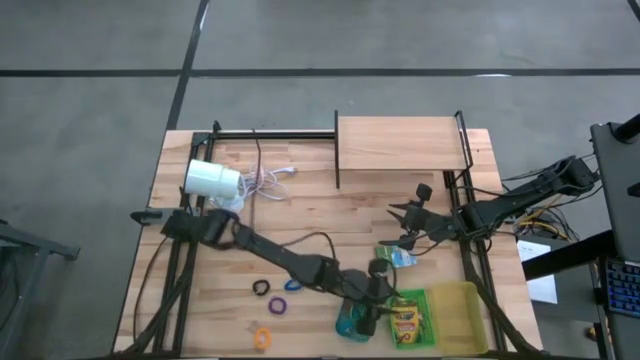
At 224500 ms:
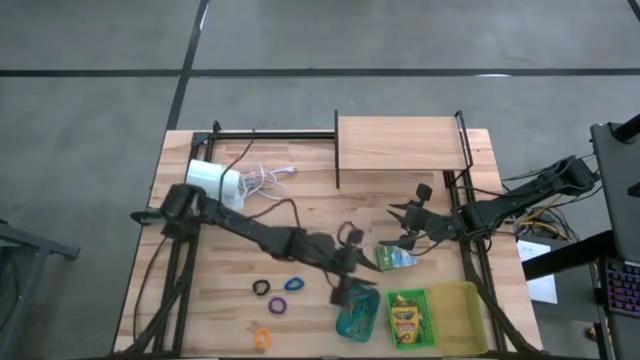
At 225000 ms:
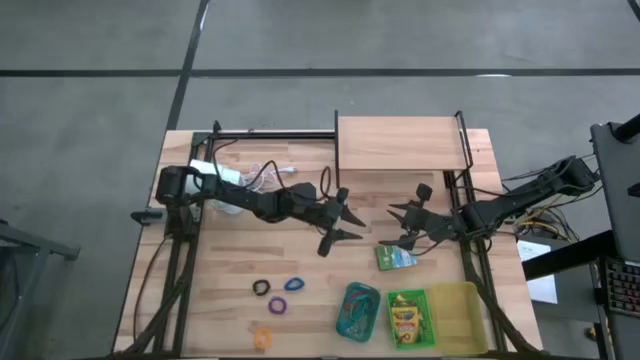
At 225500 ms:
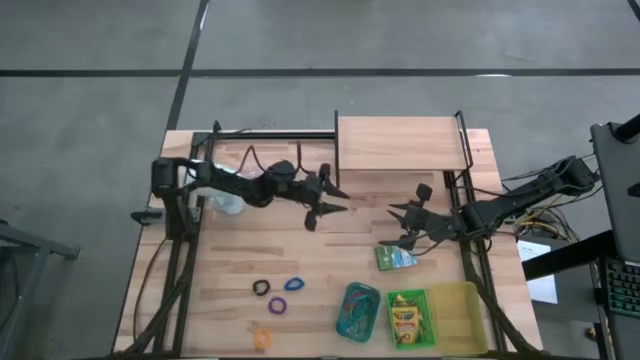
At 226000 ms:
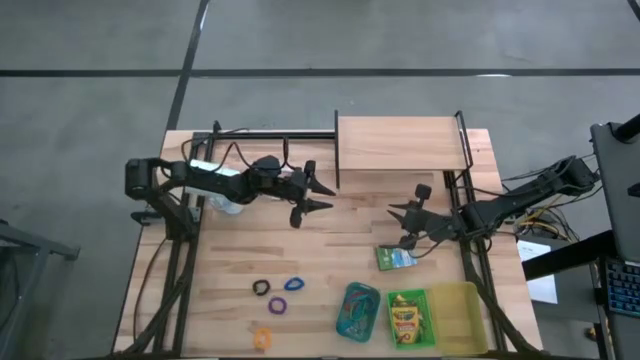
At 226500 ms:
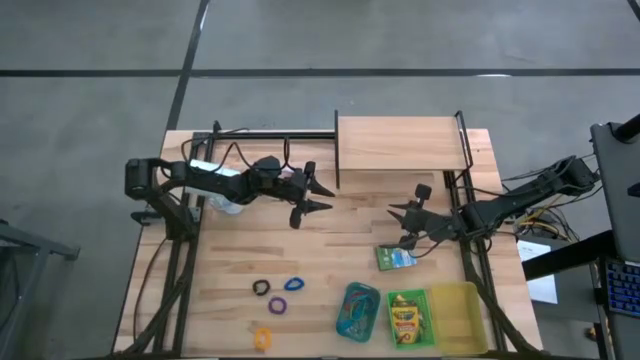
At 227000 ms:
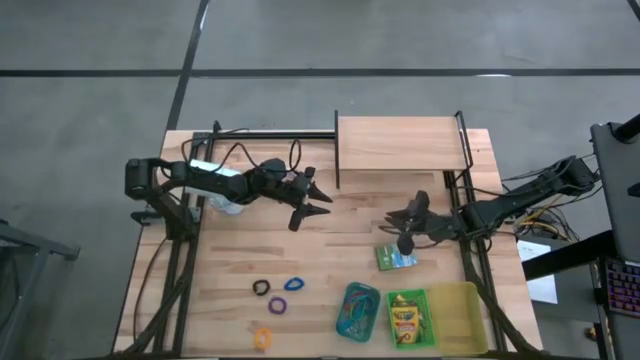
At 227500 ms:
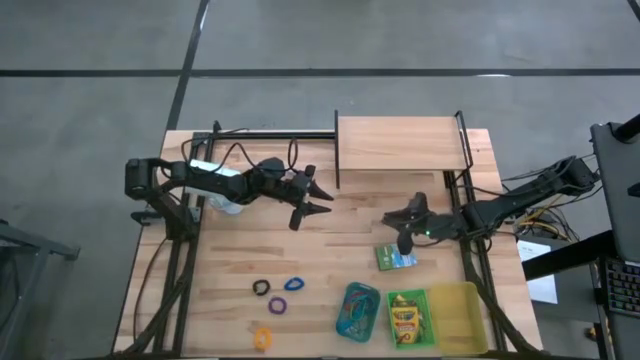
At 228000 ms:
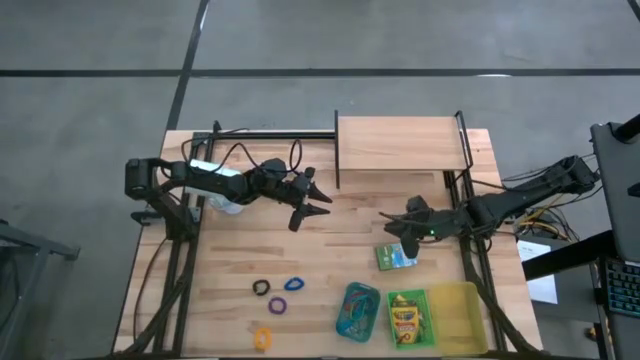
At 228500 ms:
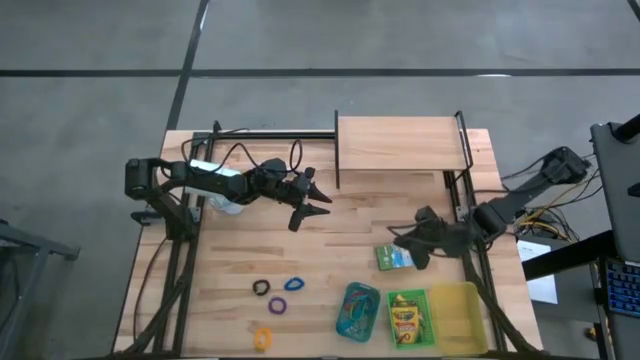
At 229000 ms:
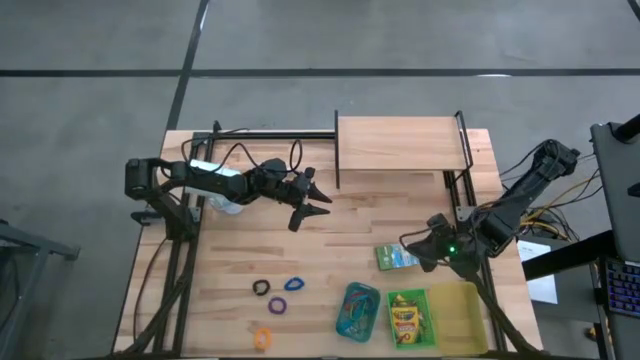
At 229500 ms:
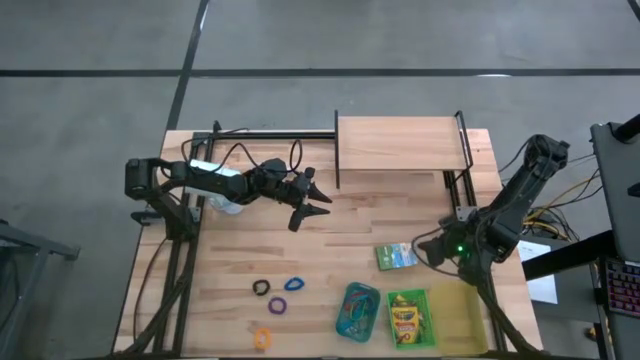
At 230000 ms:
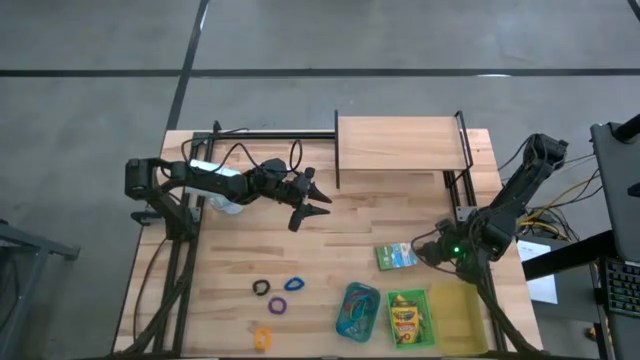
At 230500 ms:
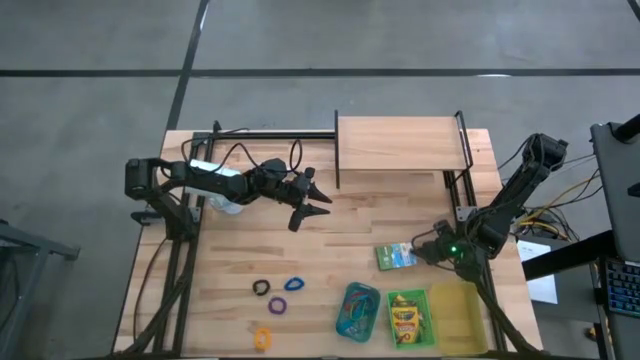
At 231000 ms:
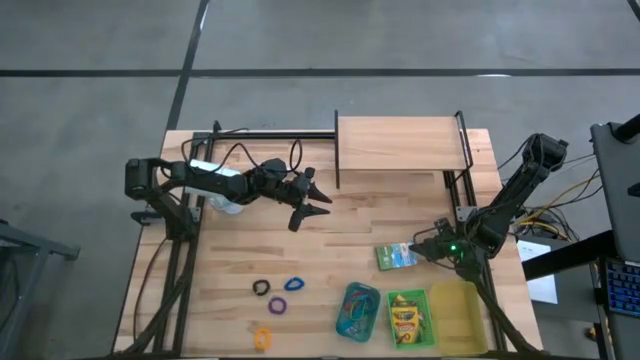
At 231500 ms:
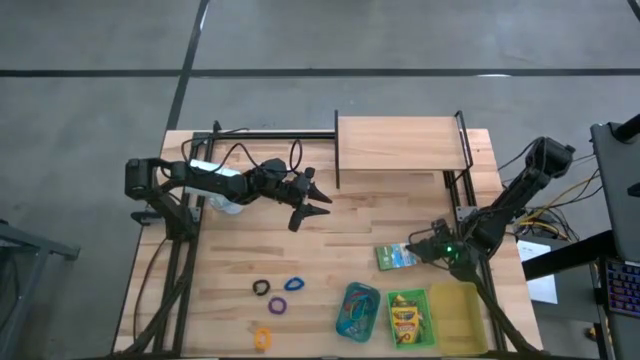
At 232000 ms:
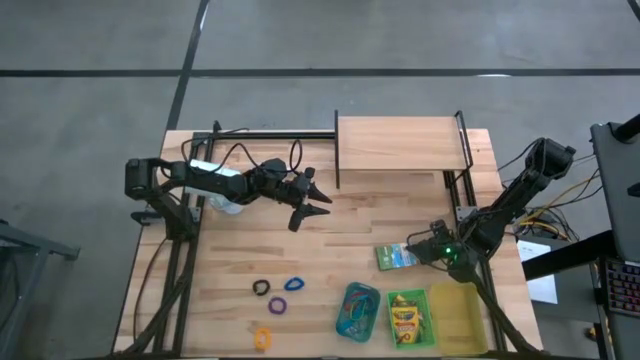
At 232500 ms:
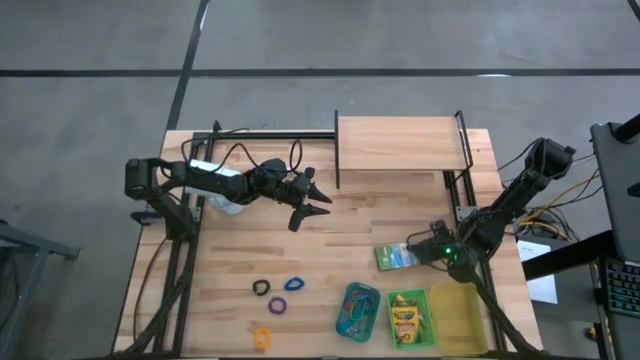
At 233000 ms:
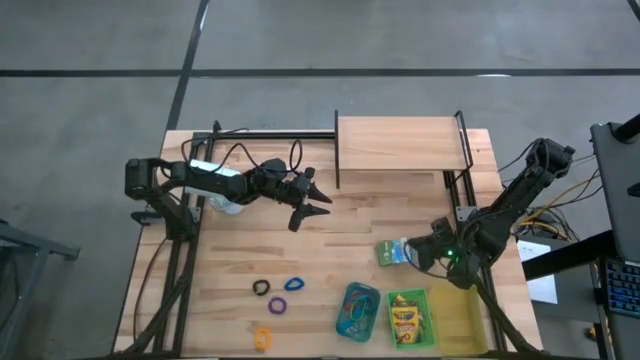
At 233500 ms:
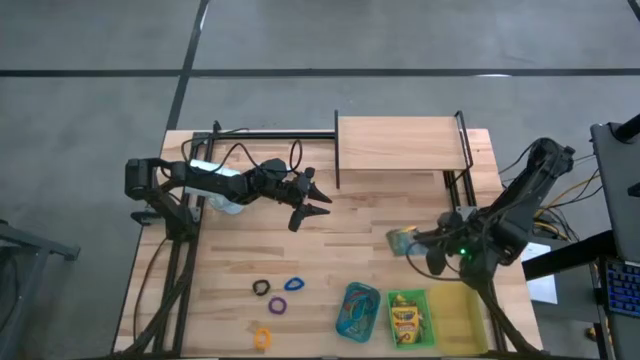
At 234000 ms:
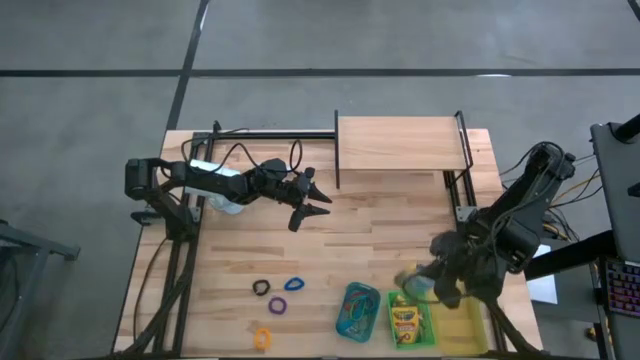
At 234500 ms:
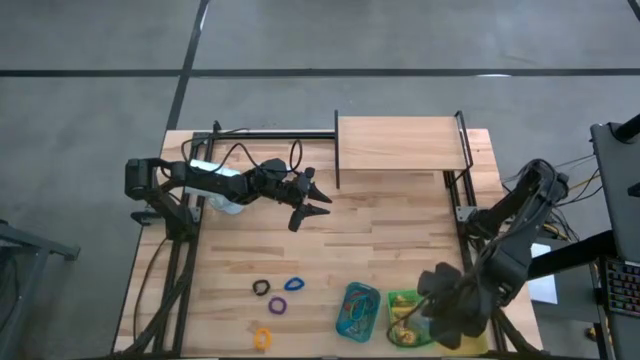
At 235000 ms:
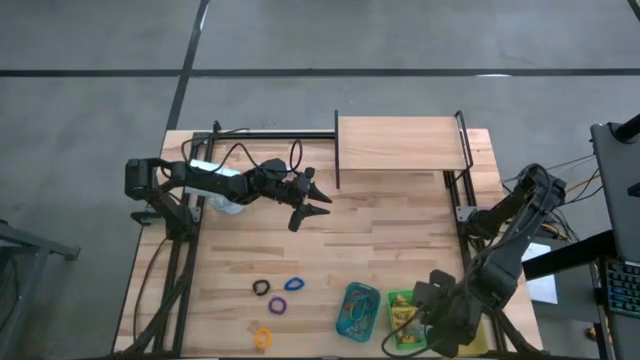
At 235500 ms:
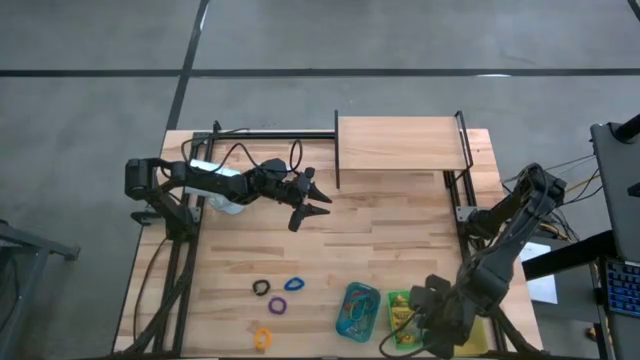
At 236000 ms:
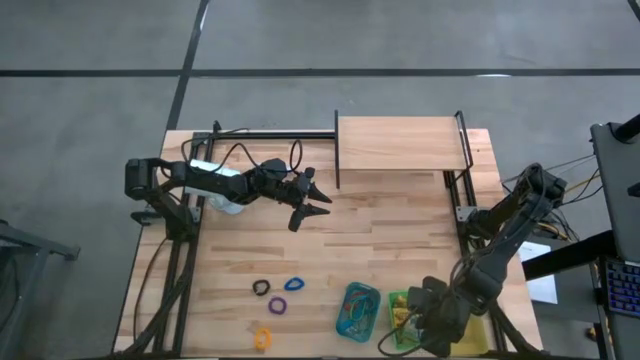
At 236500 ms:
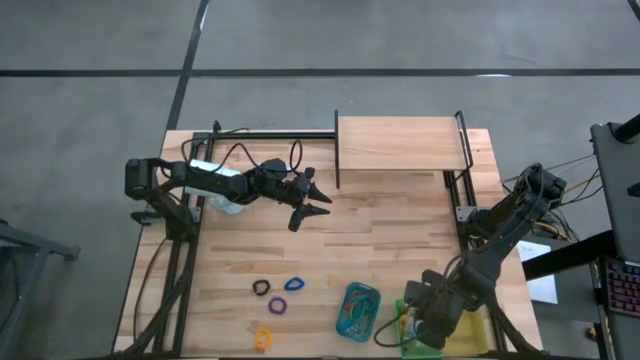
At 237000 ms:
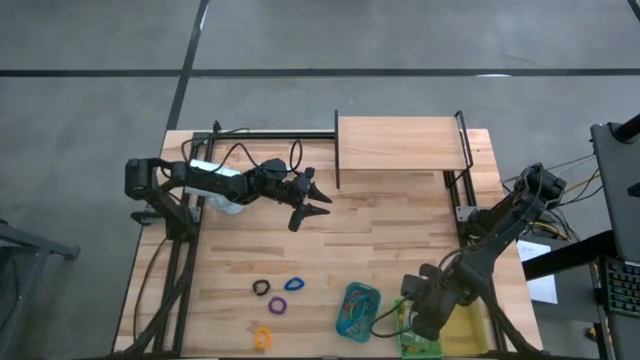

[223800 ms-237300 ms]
Task: Pick & Place Office Desk Supplies
Put the crayon box into the green bin

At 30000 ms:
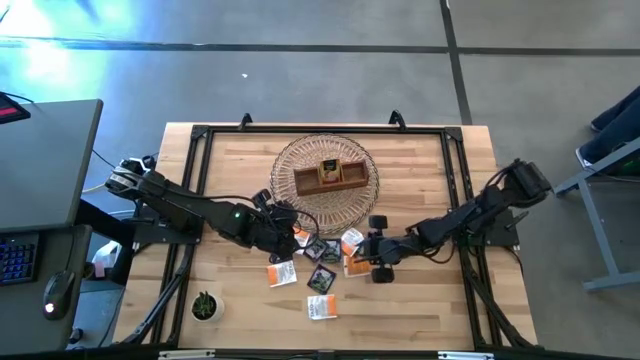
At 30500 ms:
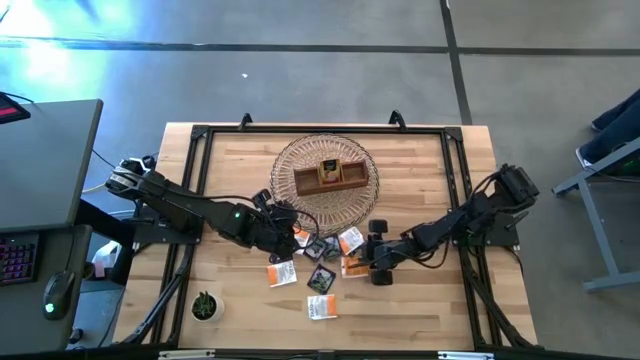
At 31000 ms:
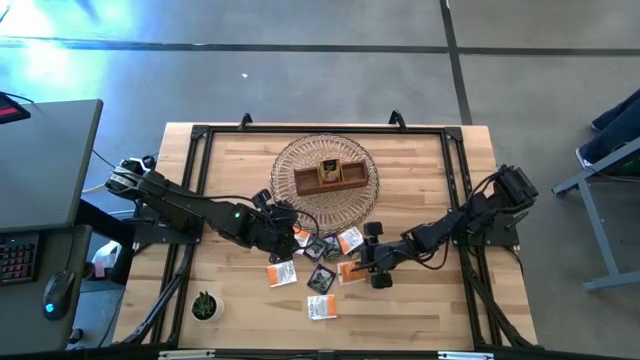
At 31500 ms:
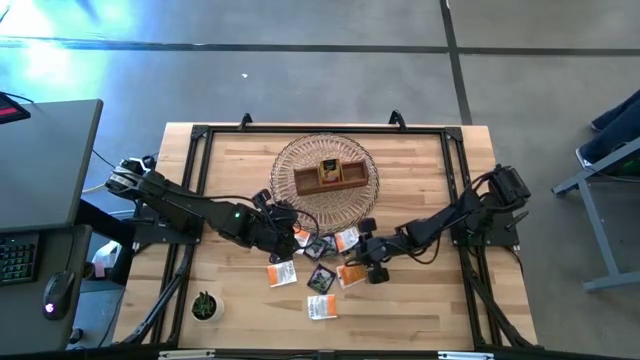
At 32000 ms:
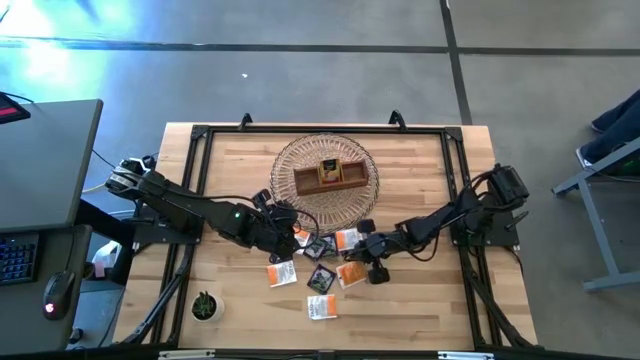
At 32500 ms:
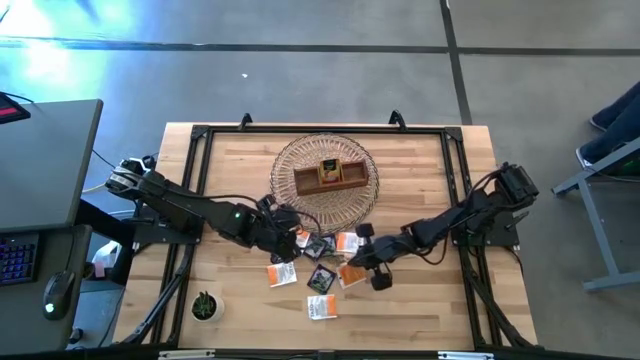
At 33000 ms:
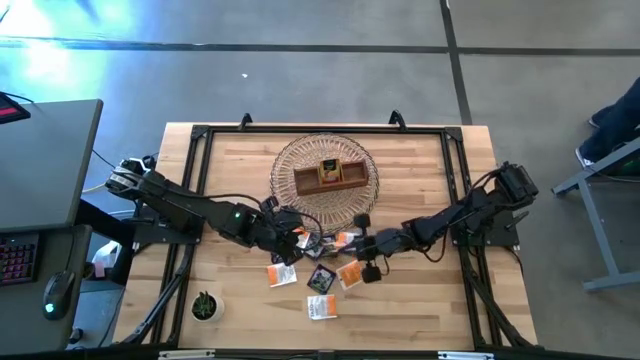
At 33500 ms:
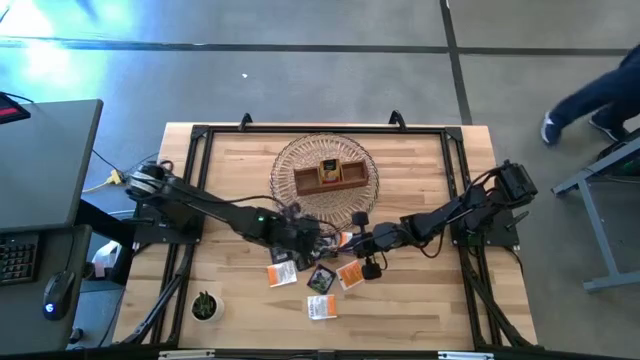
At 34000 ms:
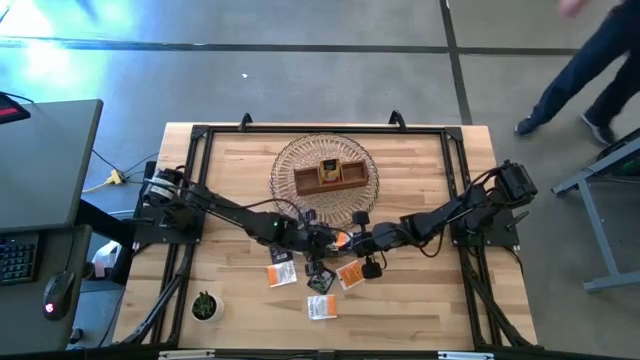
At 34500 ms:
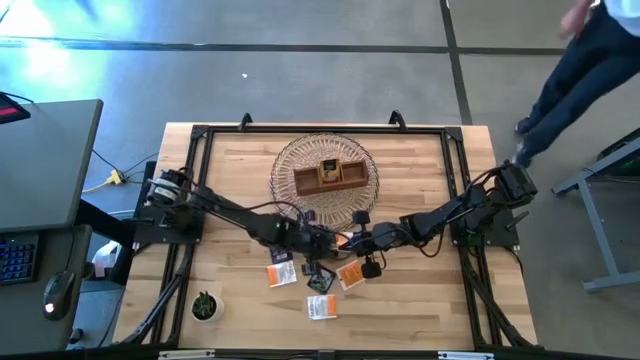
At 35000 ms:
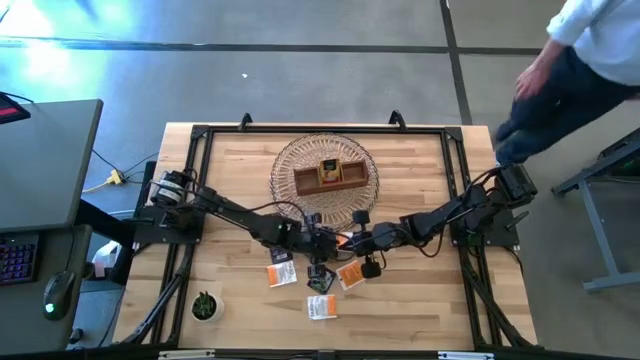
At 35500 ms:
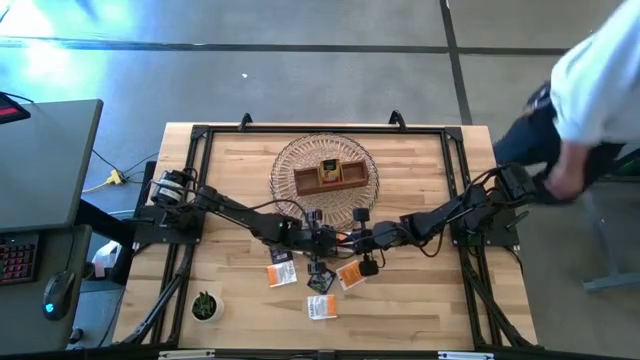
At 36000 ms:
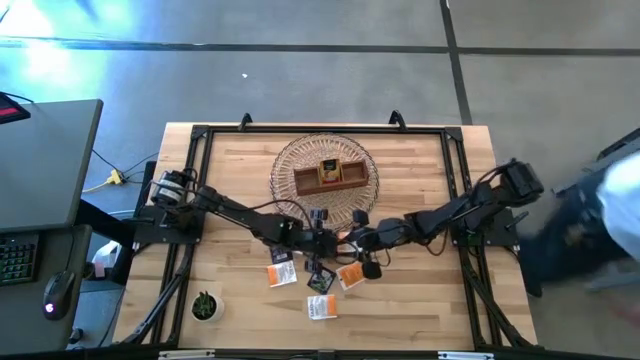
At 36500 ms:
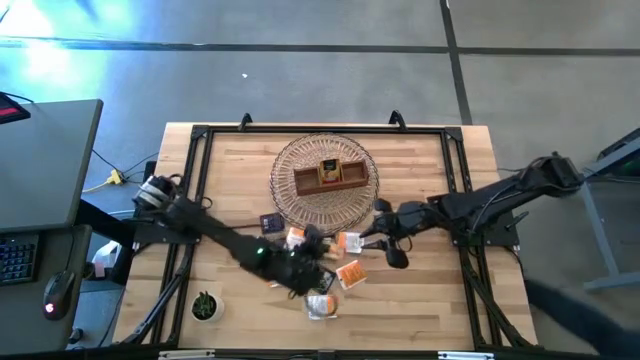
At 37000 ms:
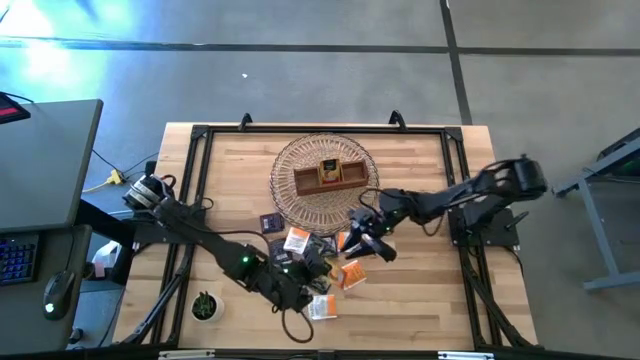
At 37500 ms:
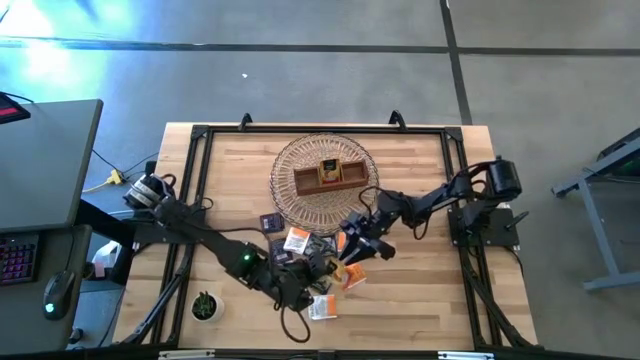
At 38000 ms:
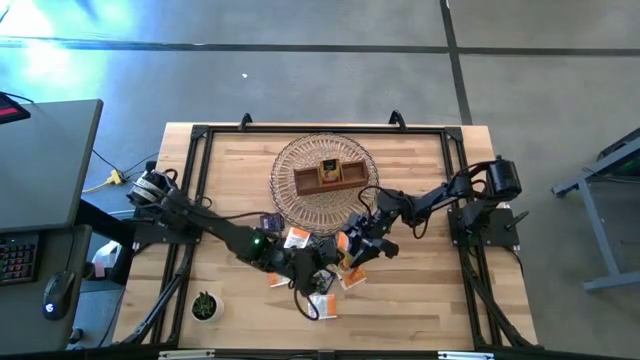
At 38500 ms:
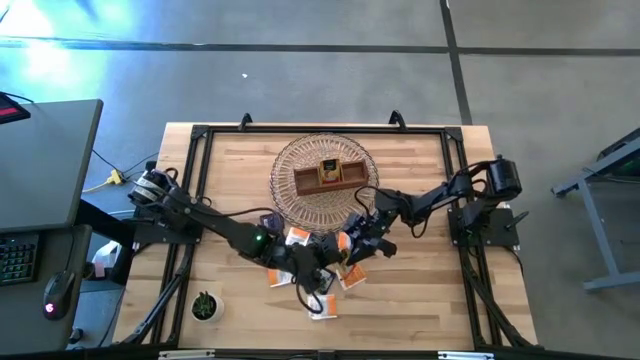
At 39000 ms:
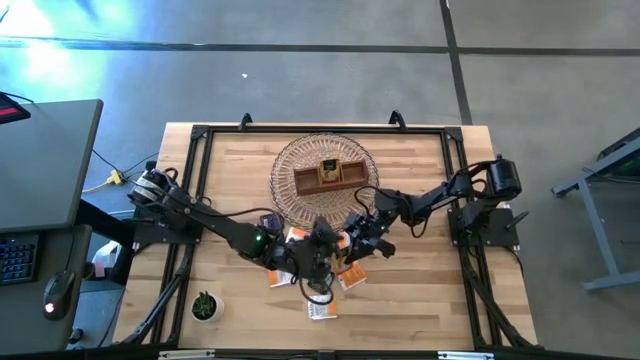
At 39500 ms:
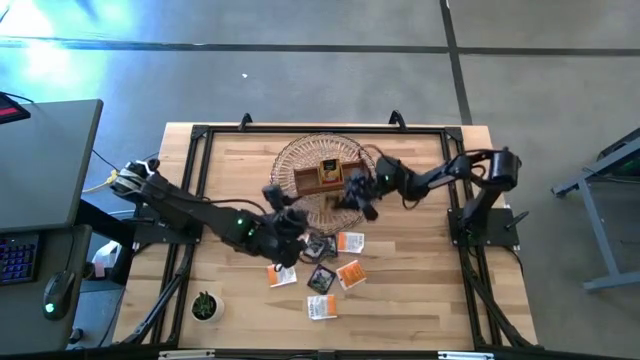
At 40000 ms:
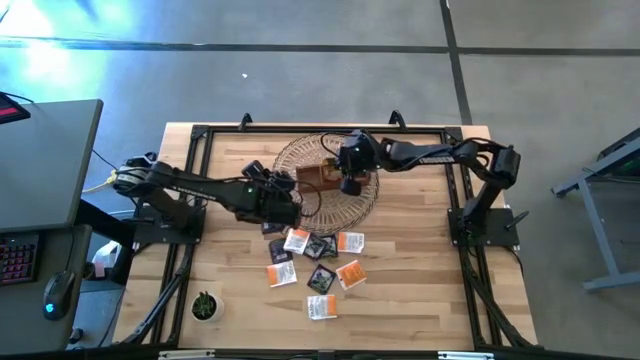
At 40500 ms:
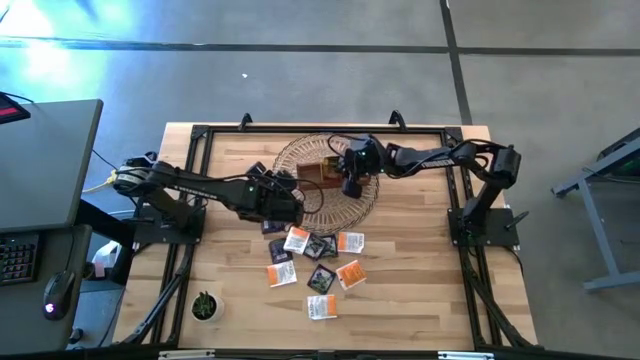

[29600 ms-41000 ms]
Task: Pick & Place Tea
Put the orange tea bag into the middle section of the wooden organizer
